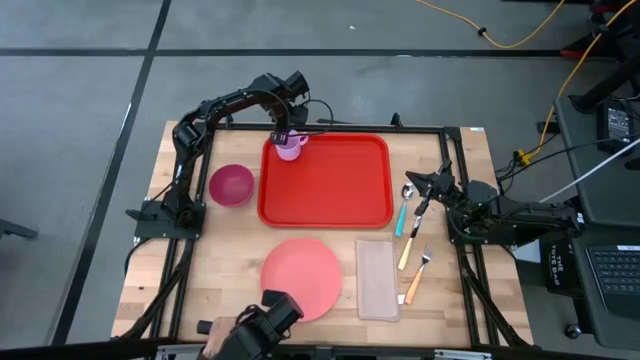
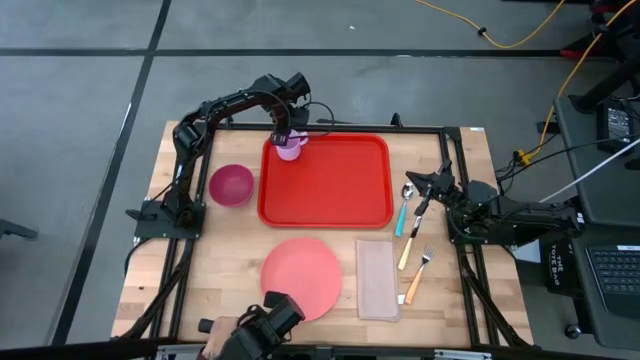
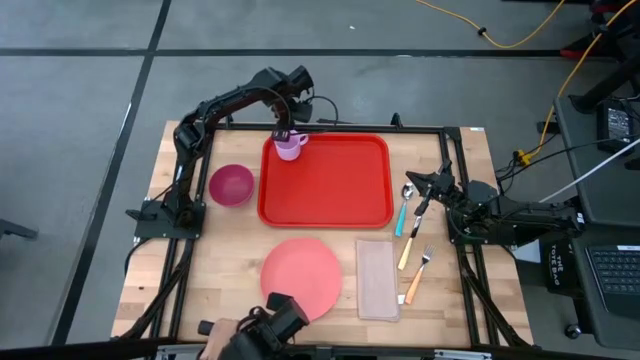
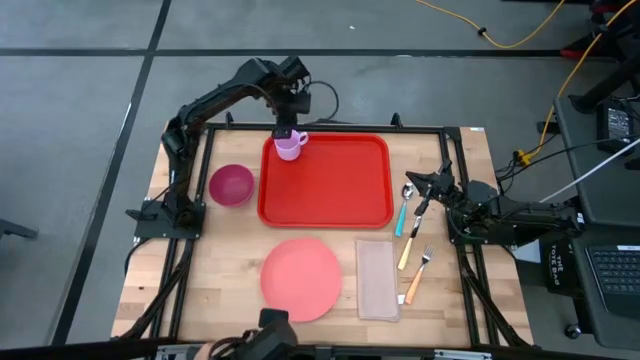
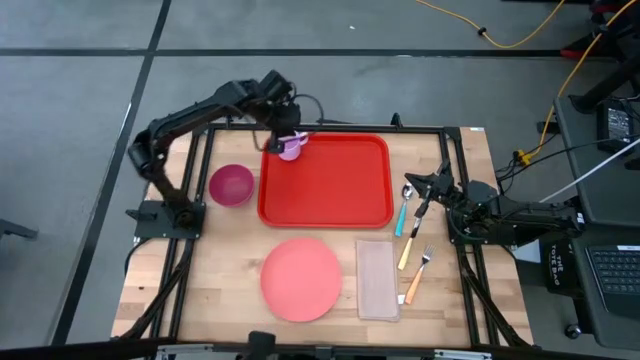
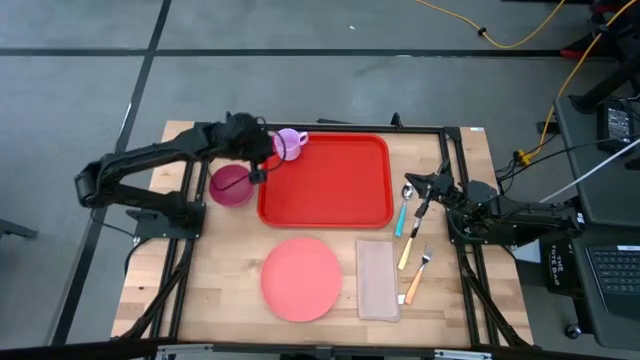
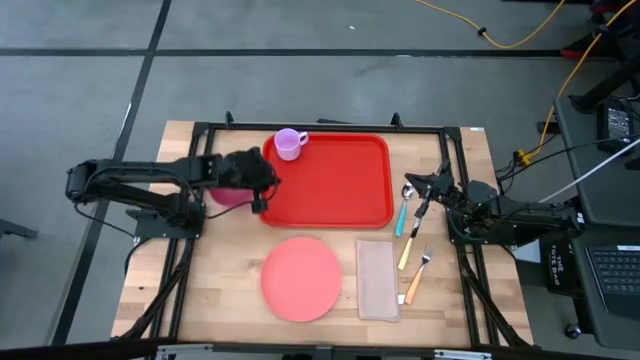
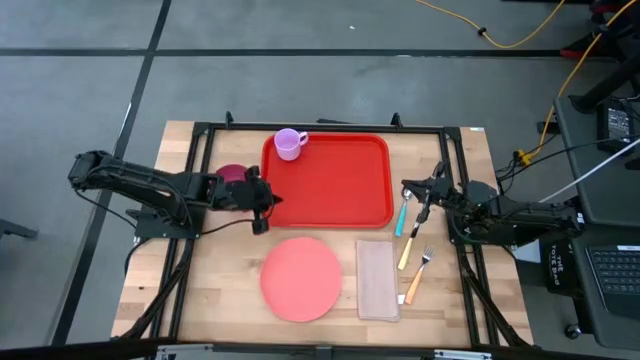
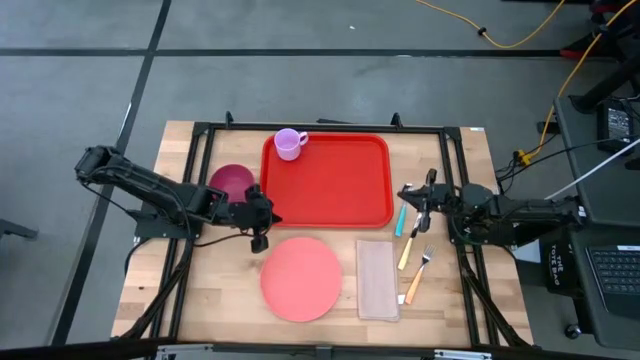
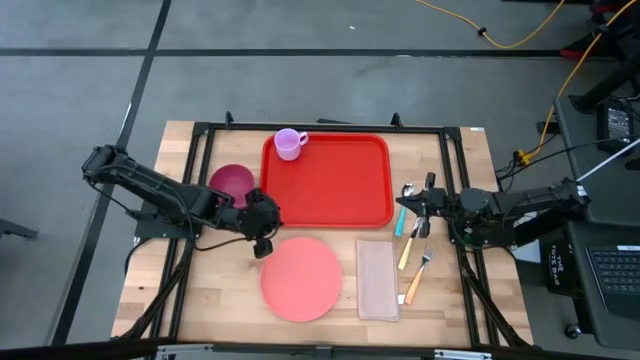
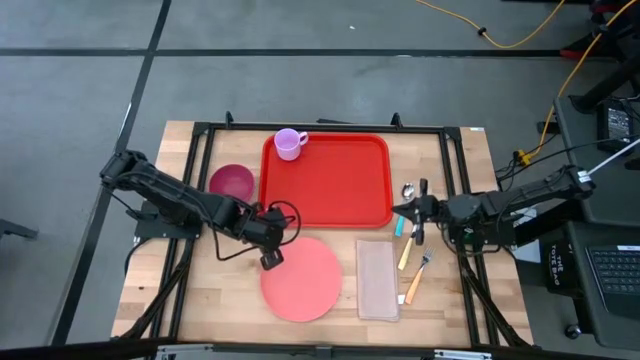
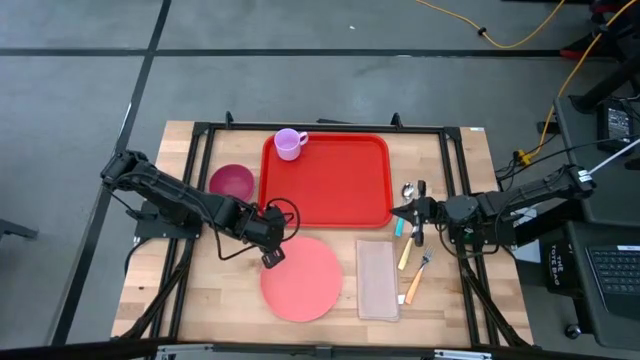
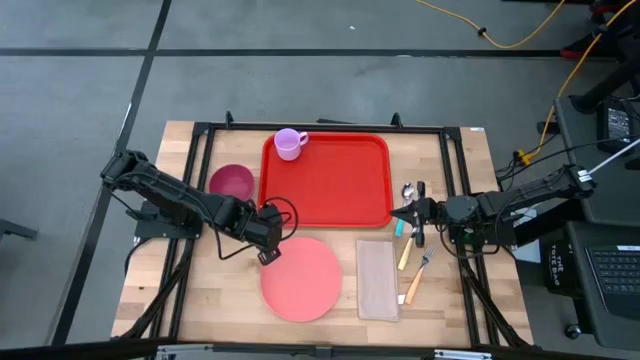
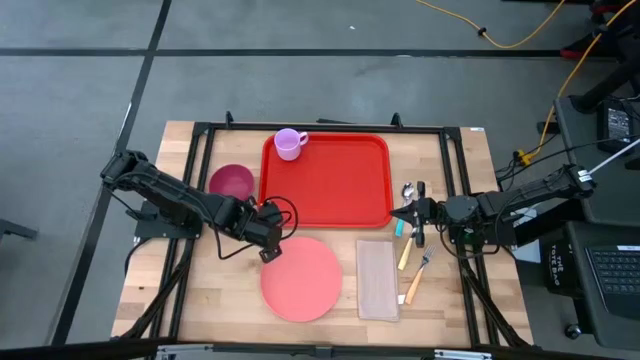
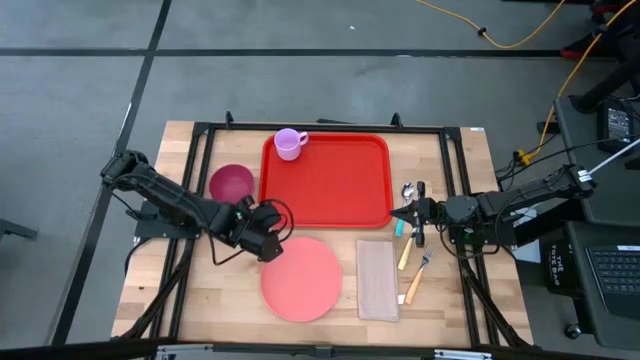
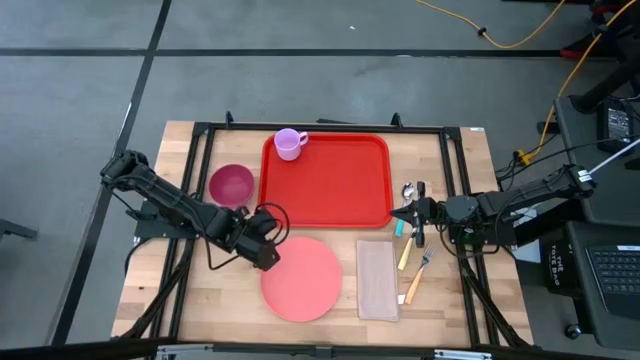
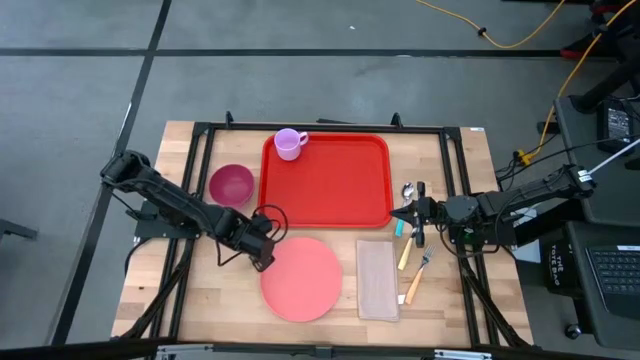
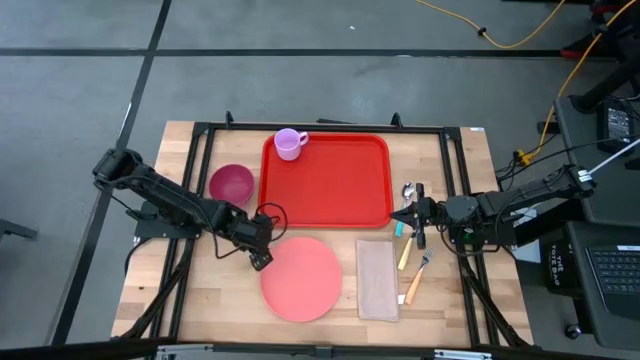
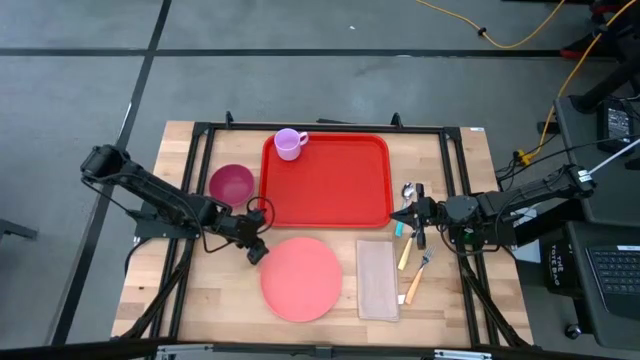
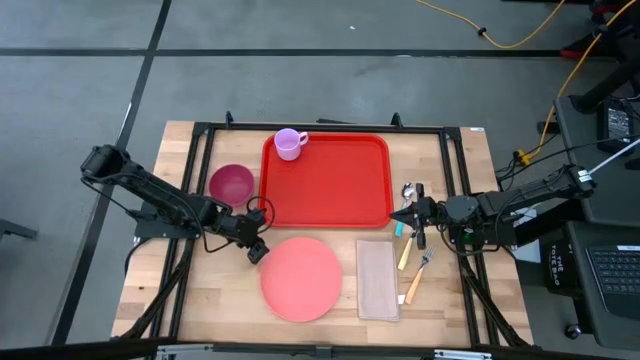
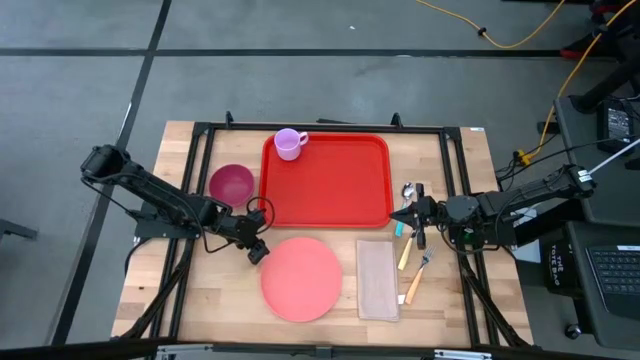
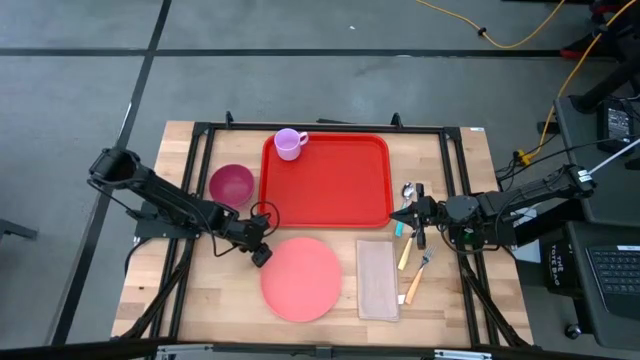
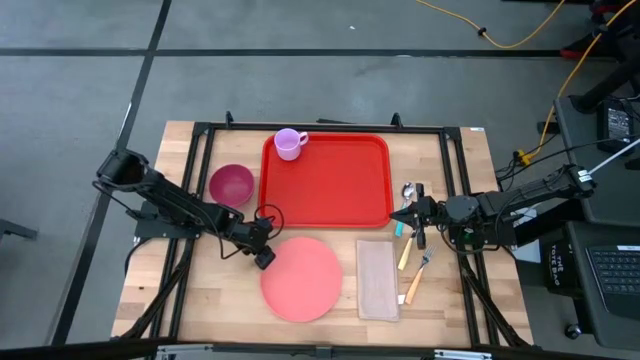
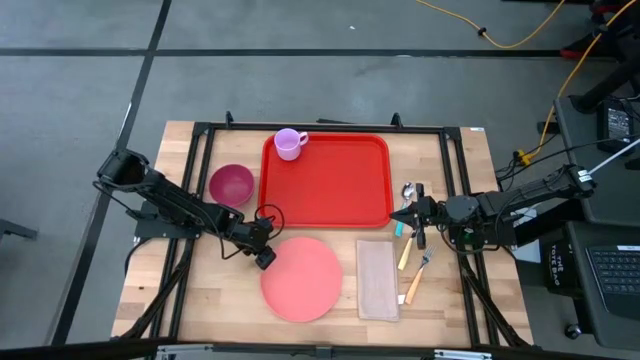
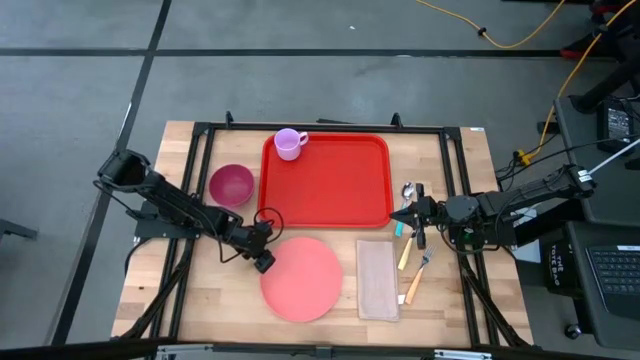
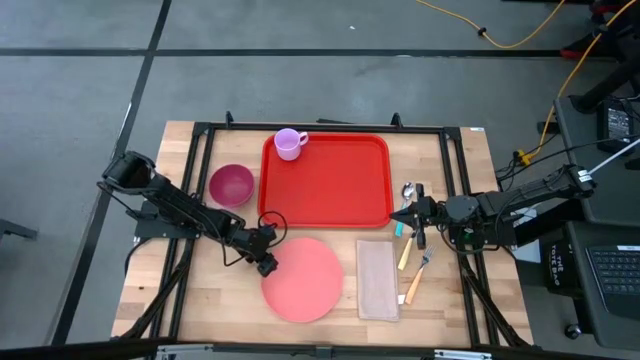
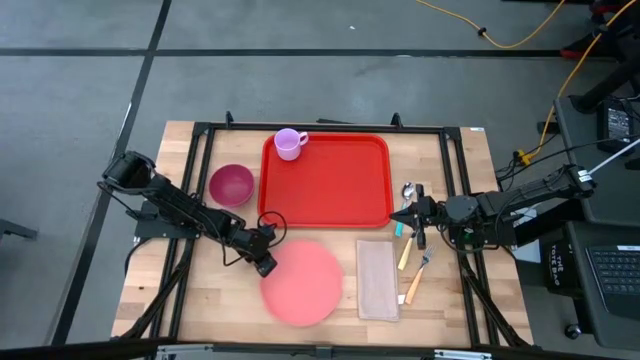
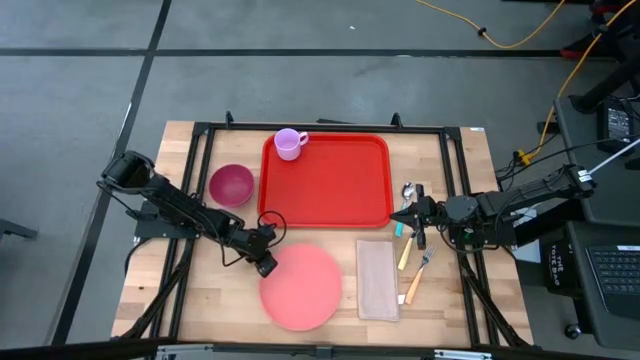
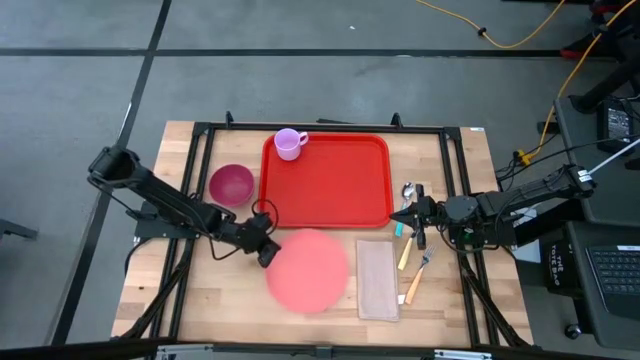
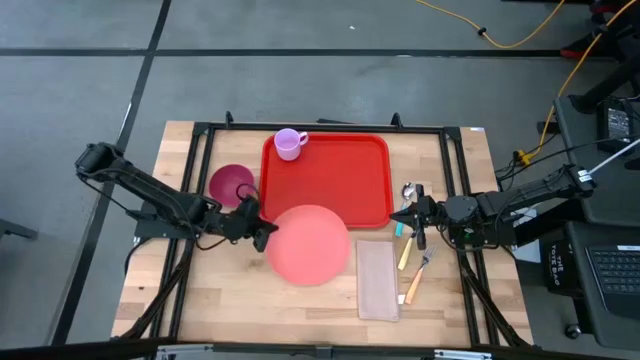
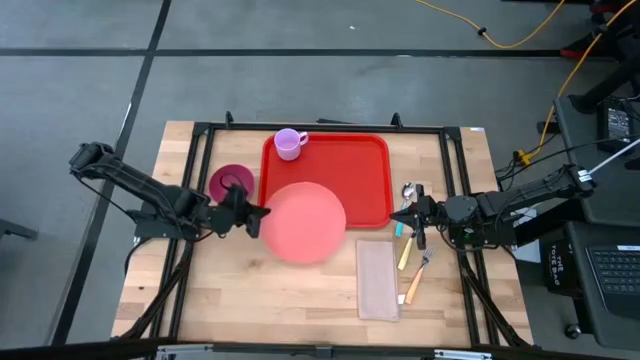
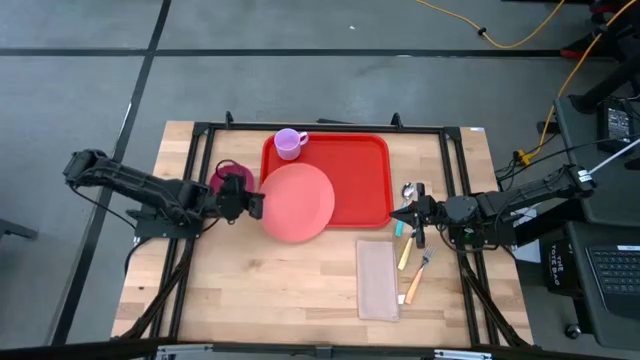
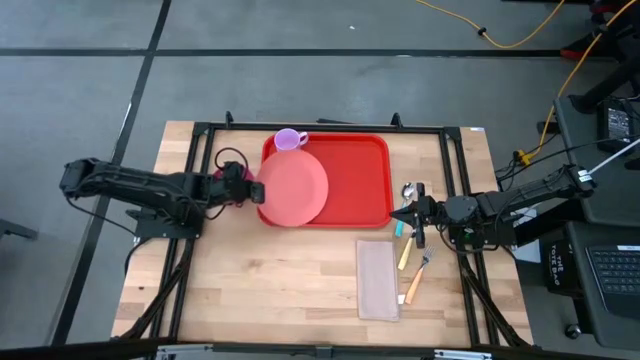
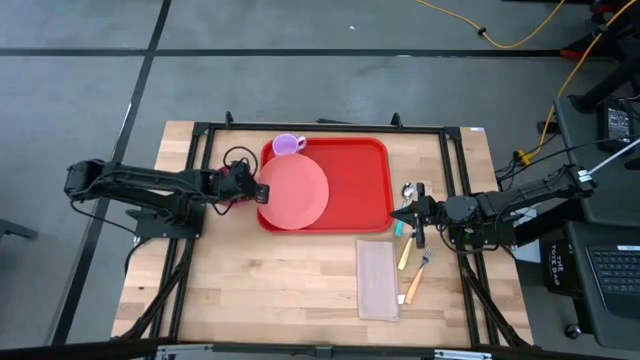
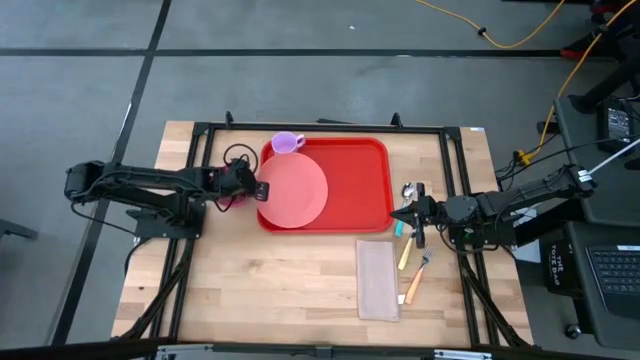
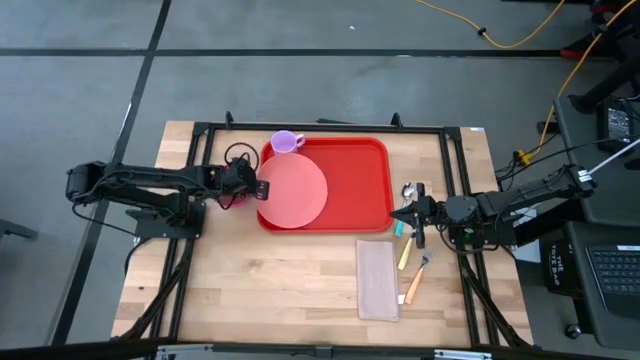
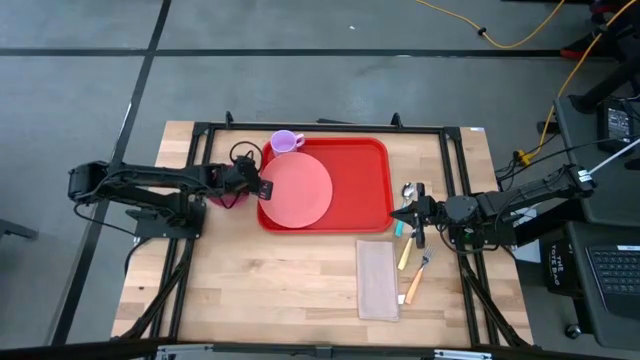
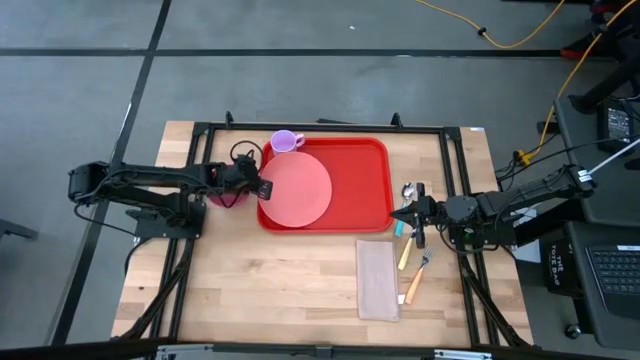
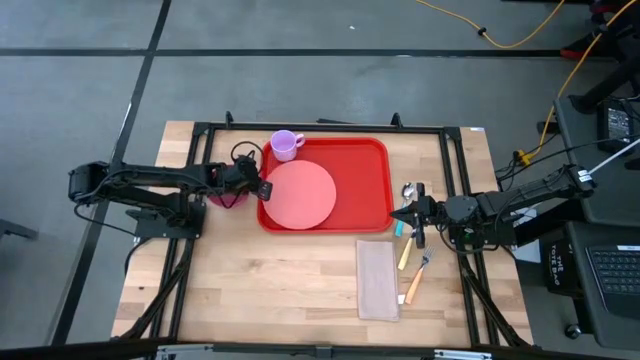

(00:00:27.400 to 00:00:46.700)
Task: Set up tray
Put the pink plate below the purple cup on the red tray

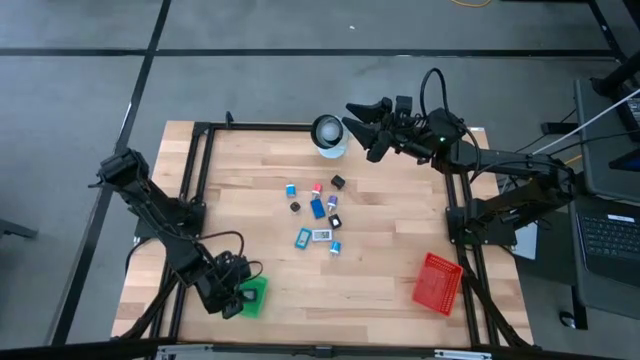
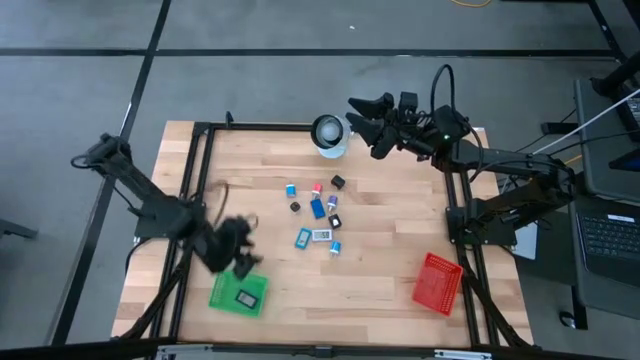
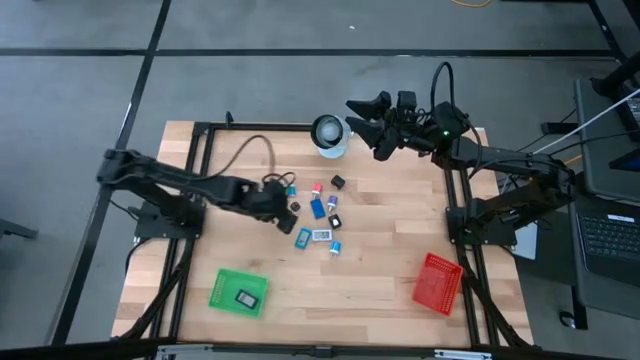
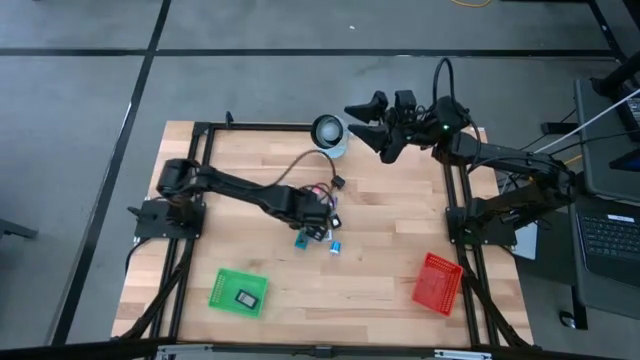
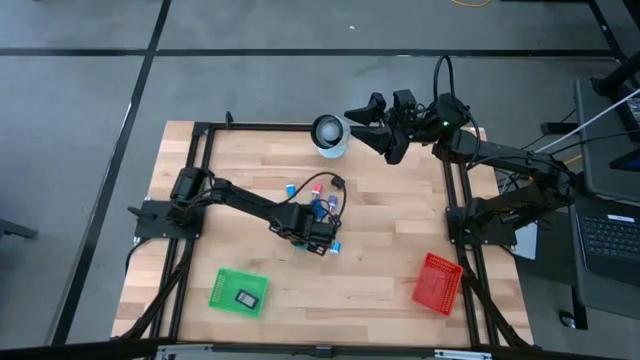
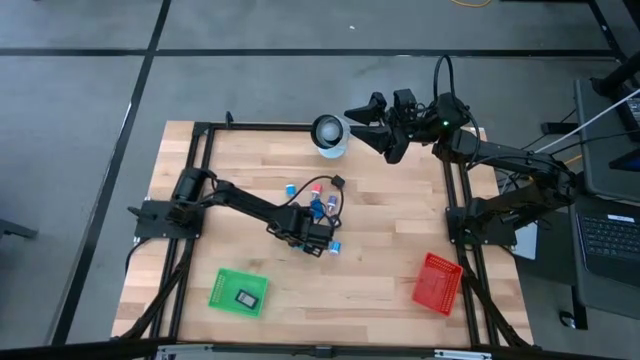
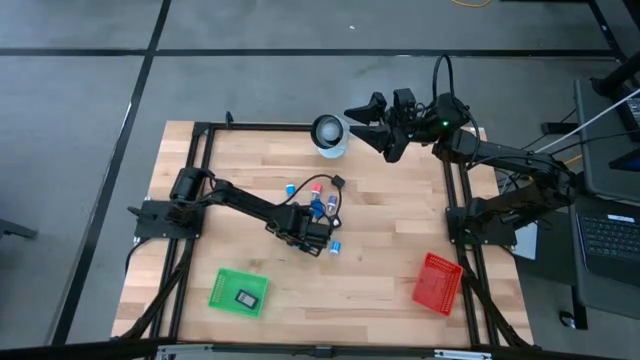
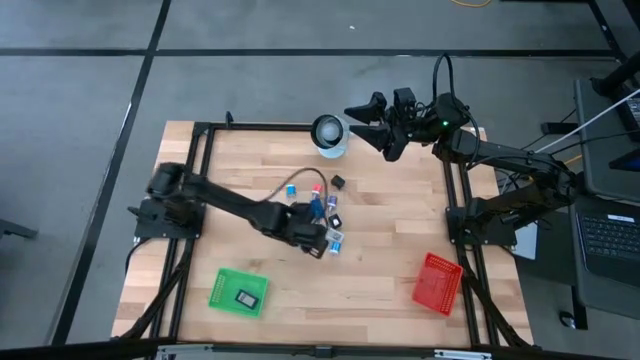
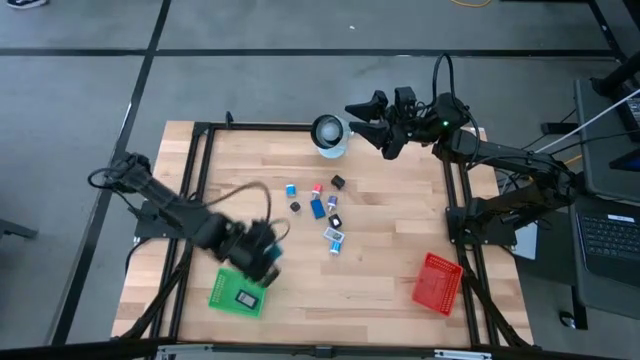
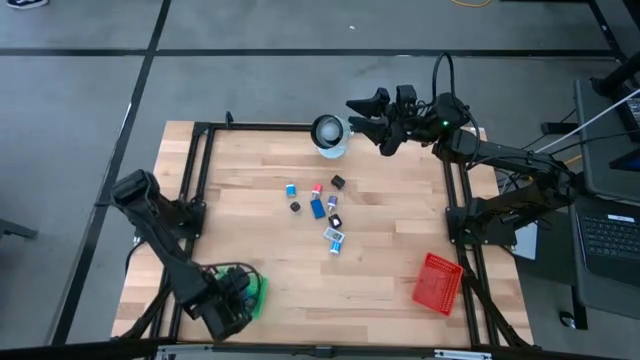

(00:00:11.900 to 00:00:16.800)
Task: Pick & Place Office items
Put the light blue digital clock into the green bin
